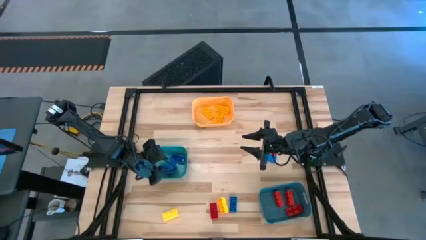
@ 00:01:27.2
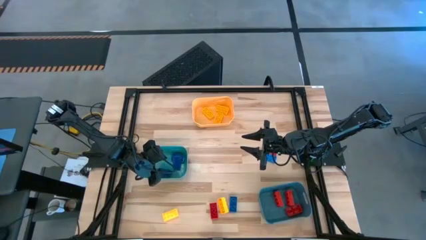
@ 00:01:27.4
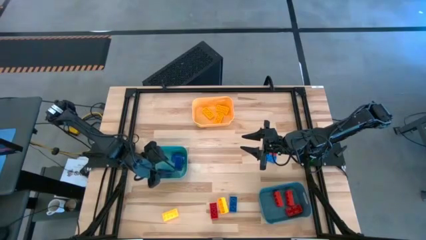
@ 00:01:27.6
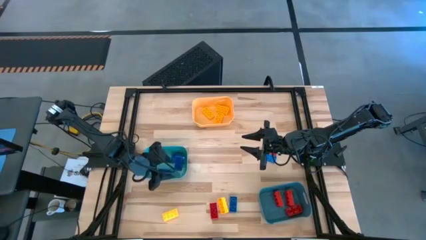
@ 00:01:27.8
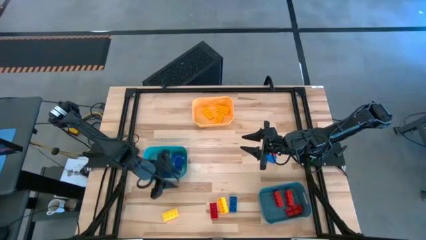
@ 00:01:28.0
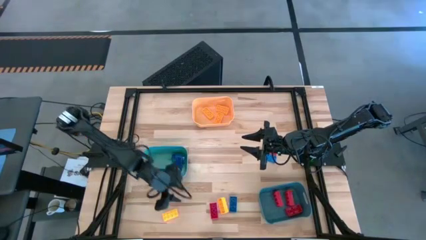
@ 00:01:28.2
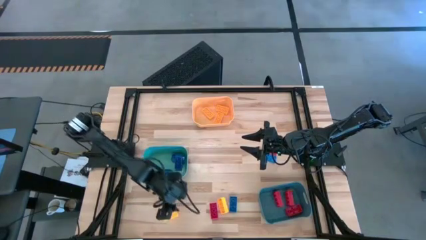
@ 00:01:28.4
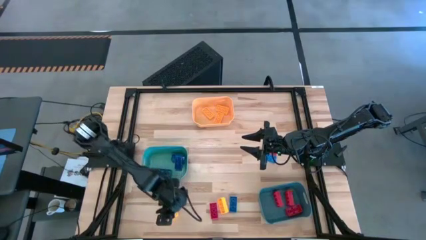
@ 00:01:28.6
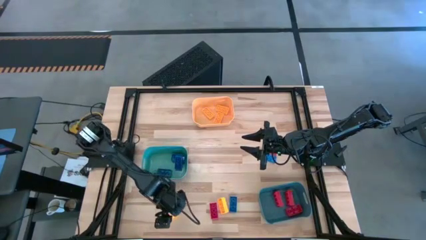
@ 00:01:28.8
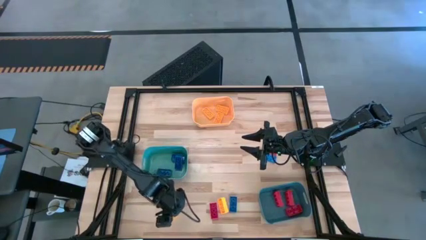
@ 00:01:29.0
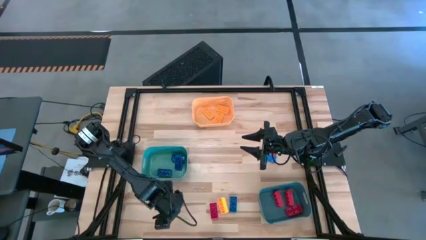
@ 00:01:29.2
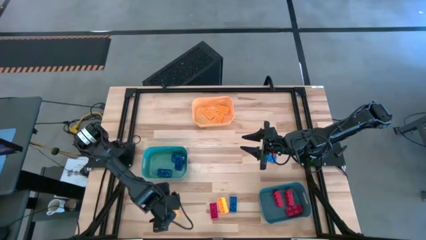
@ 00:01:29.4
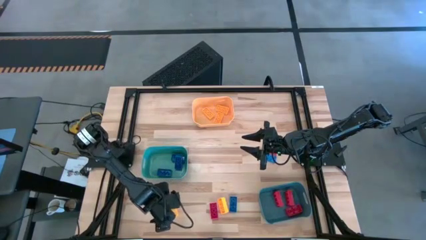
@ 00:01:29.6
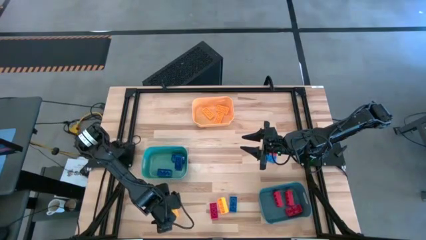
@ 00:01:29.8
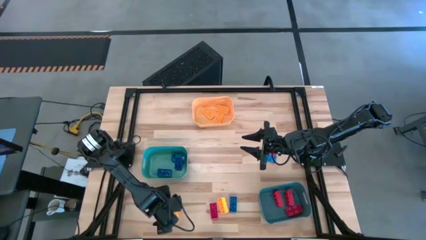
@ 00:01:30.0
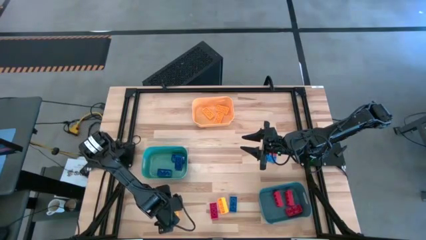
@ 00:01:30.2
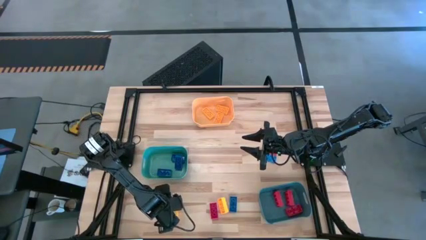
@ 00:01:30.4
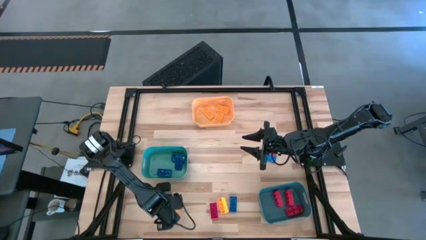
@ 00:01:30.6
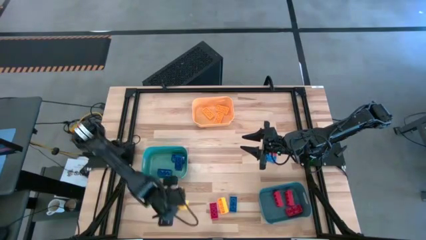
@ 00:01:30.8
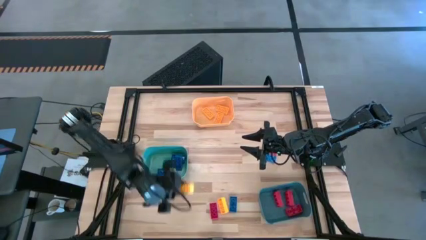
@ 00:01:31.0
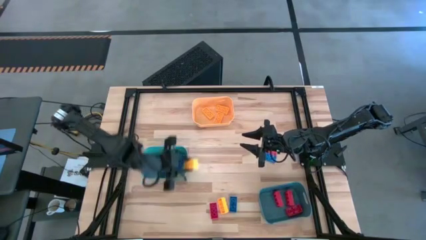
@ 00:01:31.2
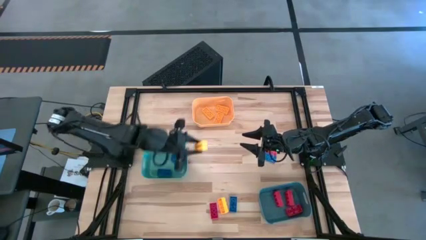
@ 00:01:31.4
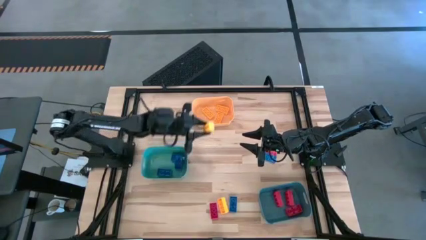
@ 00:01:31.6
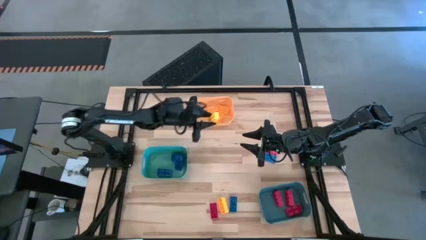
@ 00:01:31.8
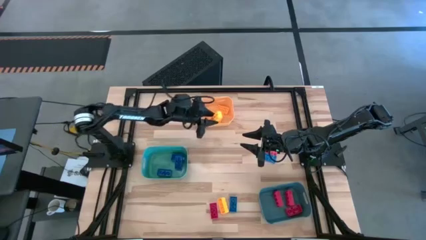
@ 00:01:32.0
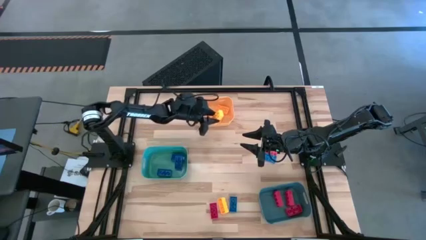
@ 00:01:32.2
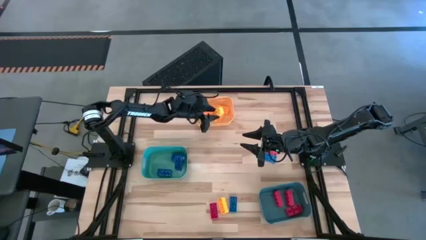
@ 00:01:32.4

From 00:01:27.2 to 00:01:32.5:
Task: Sort & place blocks by color
Put the yellow game piece into the orange bin

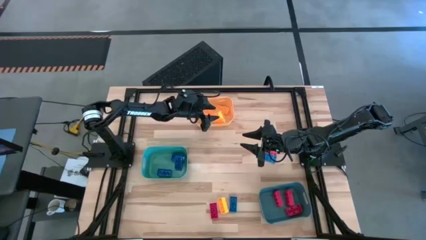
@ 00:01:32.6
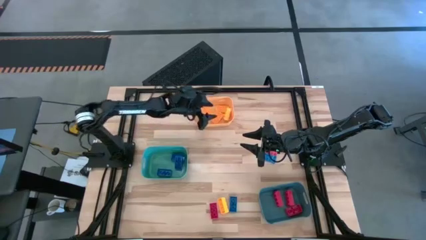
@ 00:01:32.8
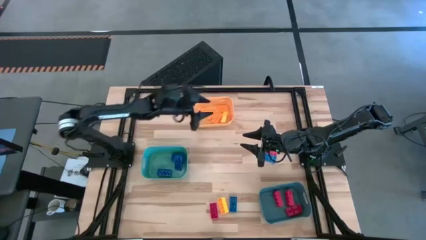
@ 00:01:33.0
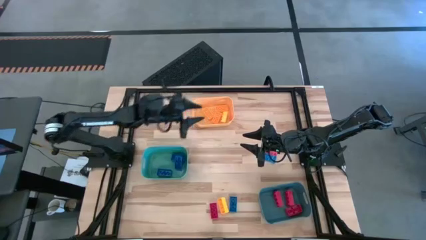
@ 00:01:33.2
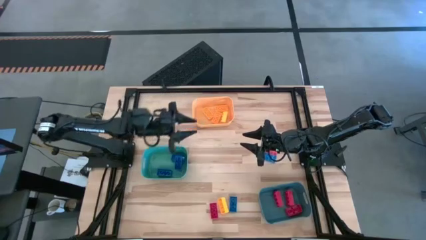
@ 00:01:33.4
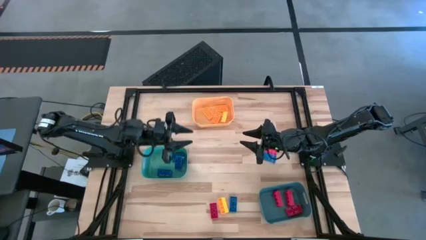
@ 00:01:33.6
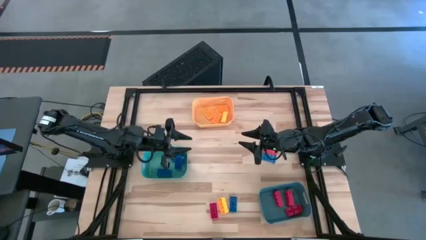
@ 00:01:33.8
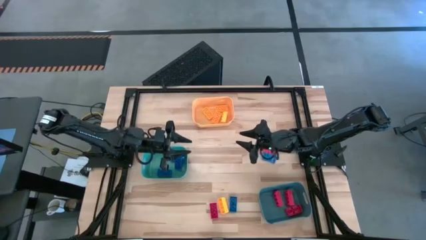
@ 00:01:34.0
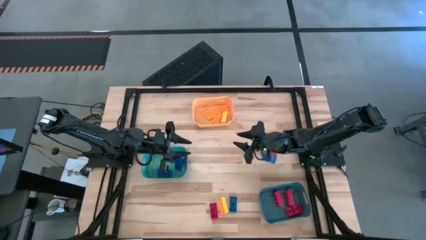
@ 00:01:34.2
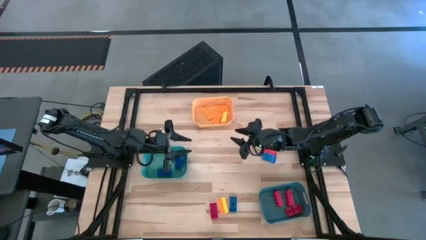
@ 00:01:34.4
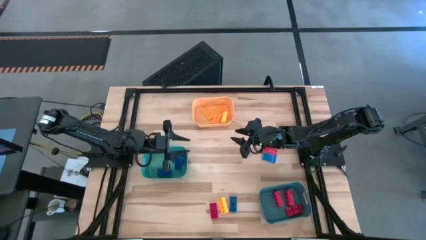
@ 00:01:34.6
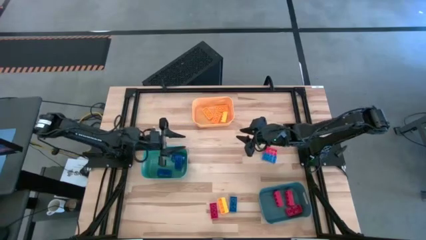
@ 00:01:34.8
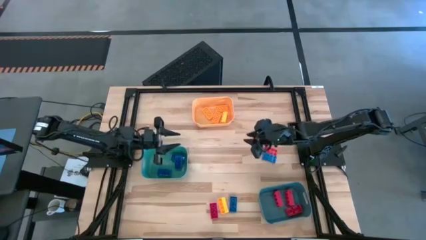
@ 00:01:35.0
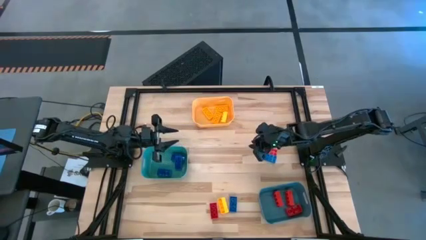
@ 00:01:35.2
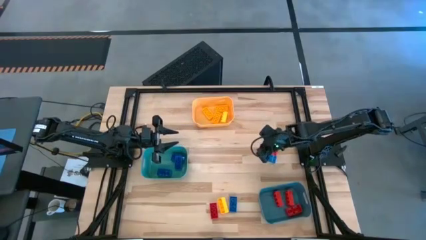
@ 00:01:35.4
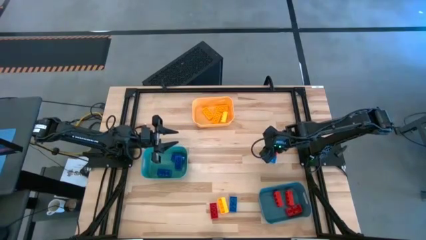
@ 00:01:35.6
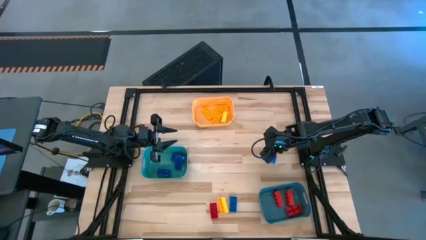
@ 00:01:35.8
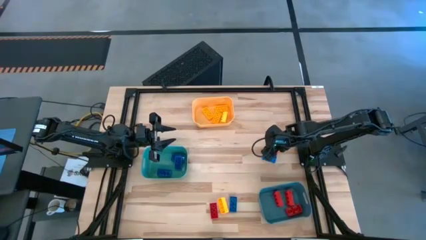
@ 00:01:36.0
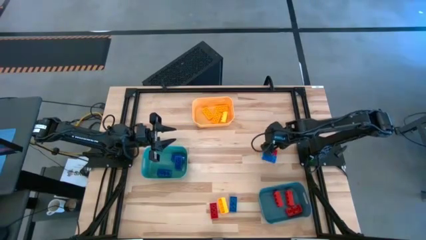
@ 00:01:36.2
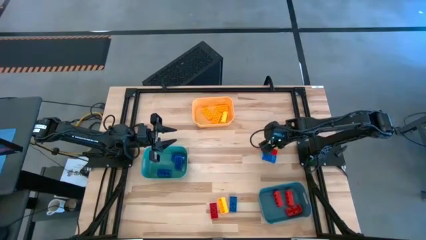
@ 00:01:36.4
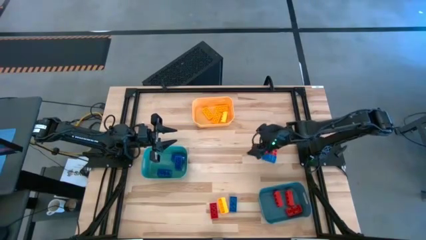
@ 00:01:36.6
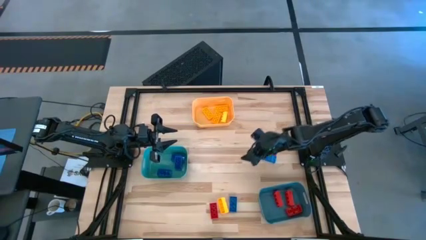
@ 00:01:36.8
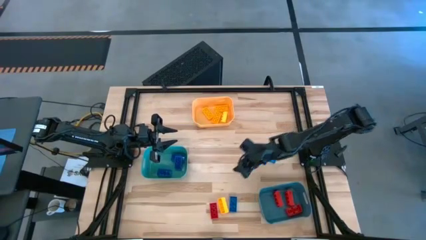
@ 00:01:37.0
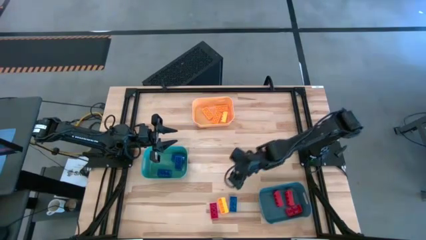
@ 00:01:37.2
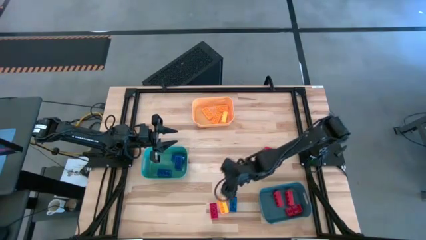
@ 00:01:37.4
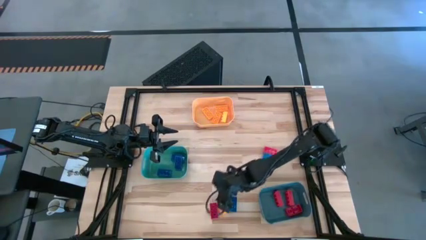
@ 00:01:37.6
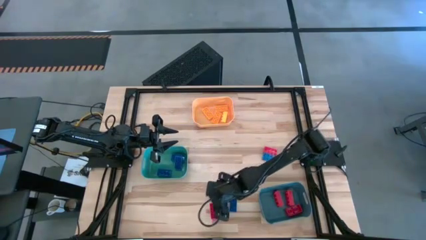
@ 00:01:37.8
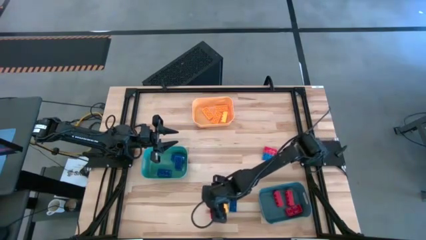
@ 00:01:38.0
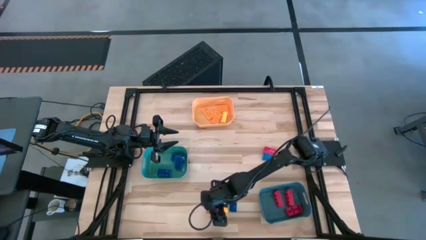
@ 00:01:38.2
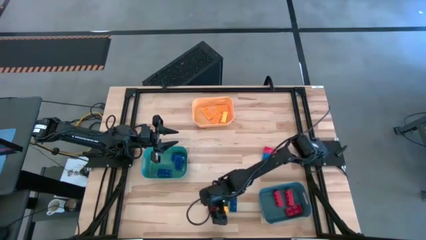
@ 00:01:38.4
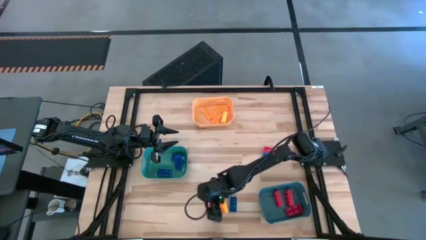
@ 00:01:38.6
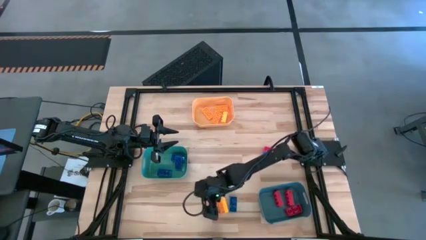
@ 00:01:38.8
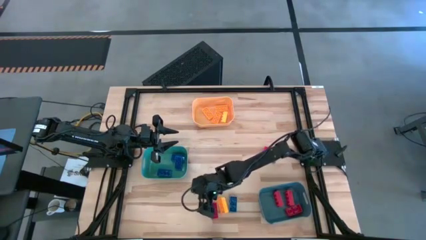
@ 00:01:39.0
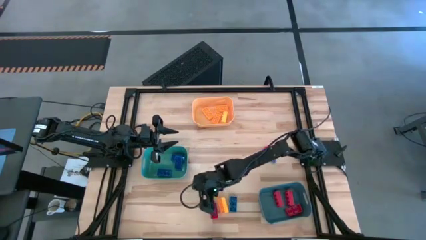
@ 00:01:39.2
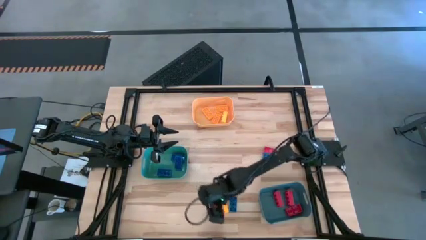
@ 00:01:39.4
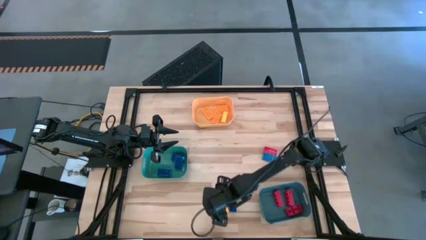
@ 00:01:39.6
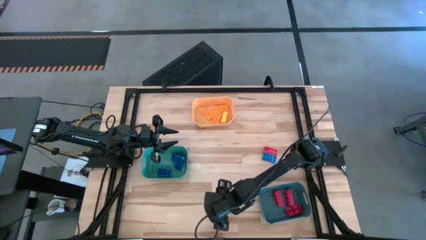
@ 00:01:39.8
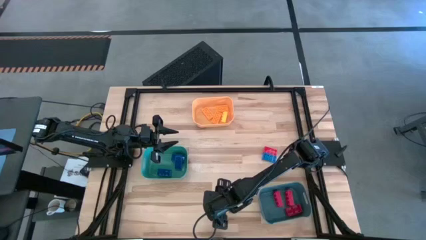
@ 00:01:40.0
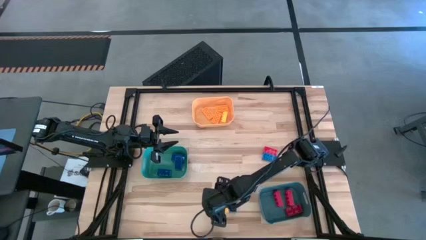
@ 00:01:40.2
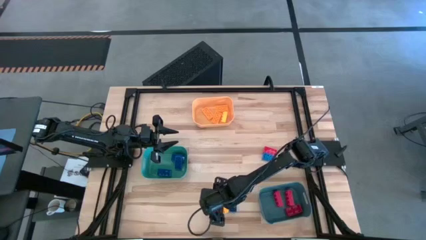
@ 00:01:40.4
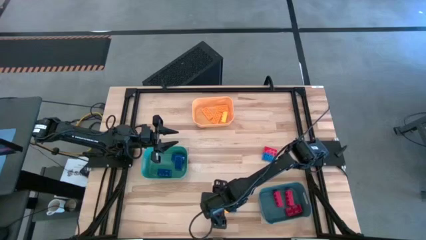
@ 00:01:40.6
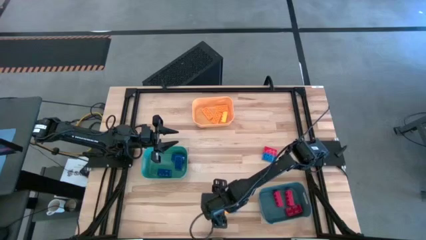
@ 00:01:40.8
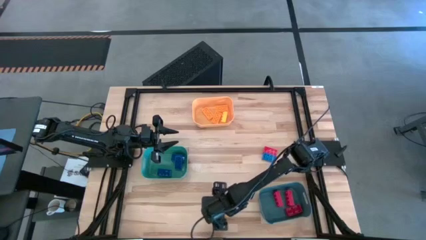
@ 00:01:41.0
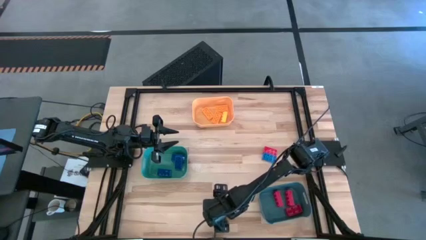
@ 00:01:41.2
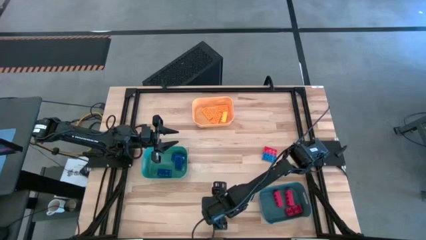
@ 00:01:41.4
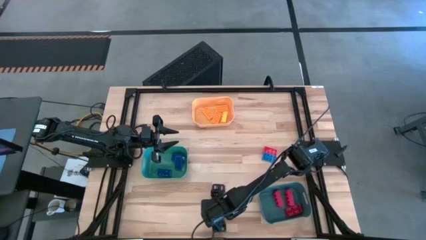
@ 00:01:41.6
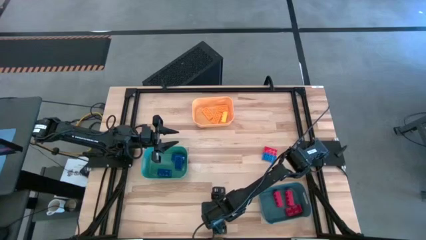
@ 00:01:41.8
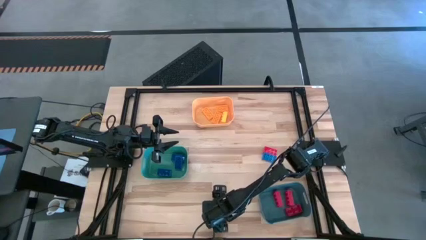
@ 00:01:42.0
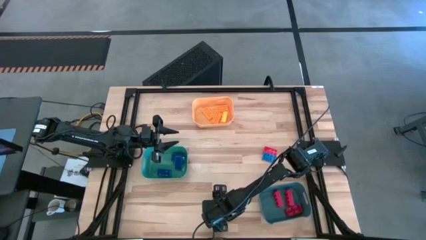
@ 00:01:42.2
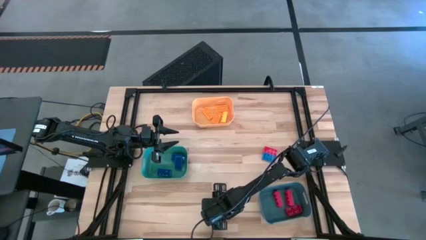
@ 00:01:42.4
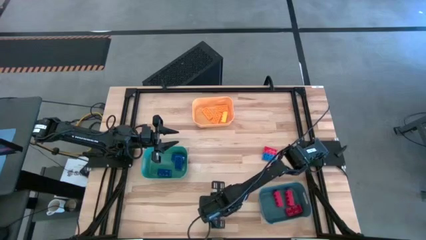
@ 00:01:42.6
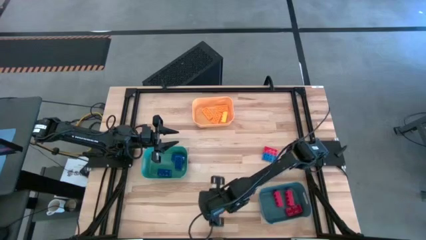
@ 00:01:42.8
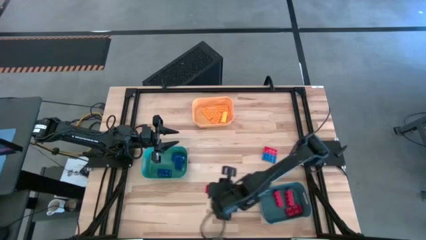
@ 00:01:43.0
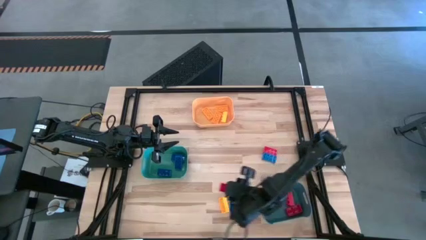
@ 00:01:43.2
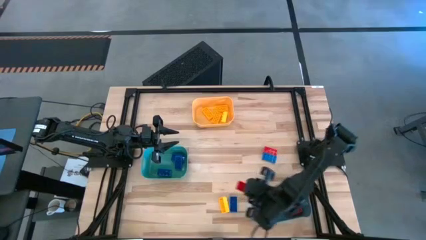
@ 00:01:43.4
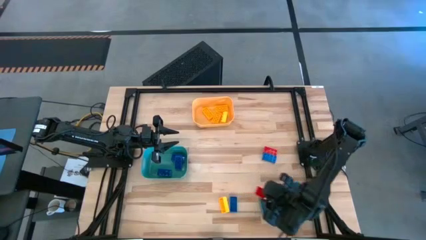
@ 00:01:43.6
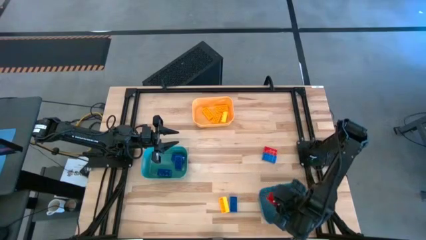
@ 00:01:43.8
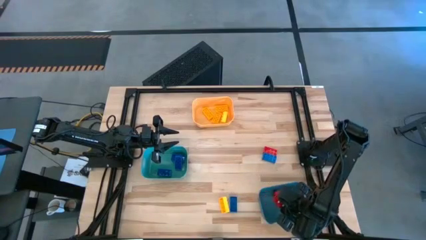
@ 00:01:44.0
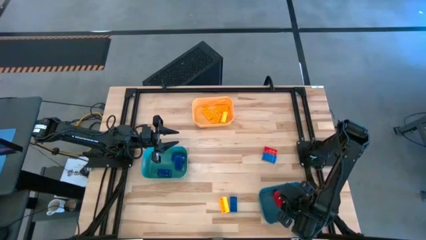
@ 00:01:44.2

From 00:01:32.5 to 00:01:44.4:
Put the red game piece into the blue bin
